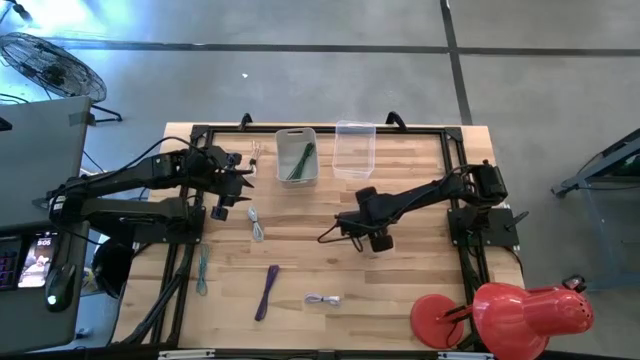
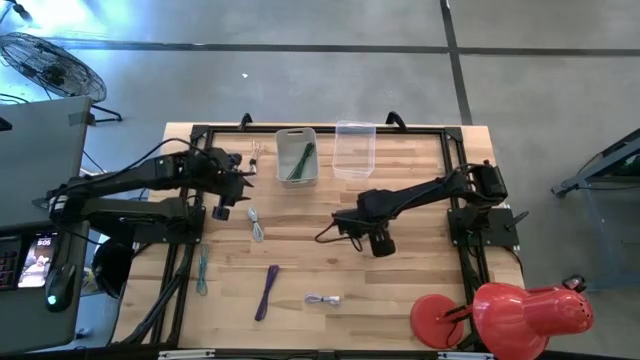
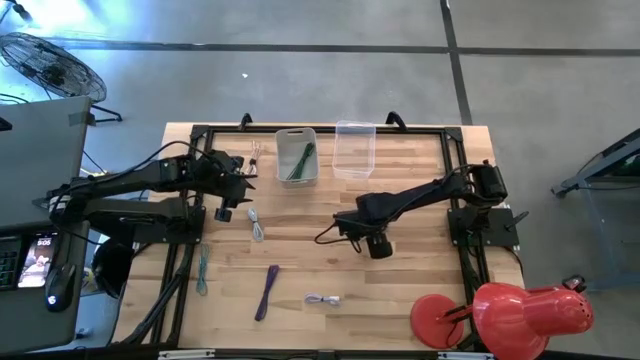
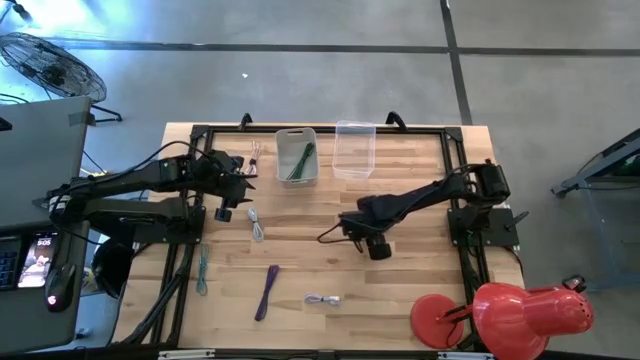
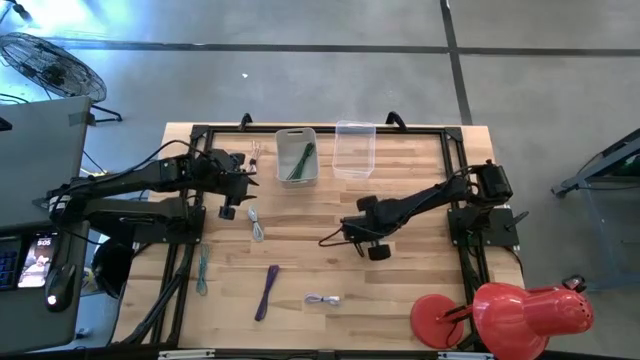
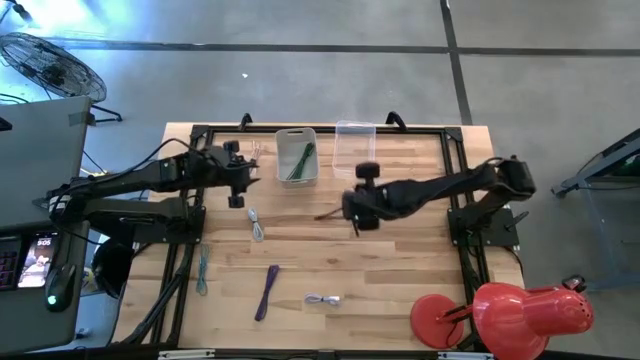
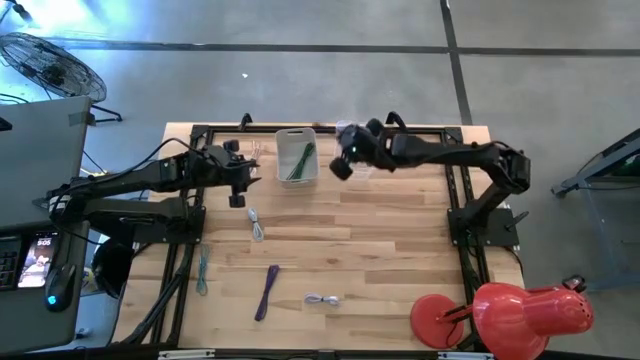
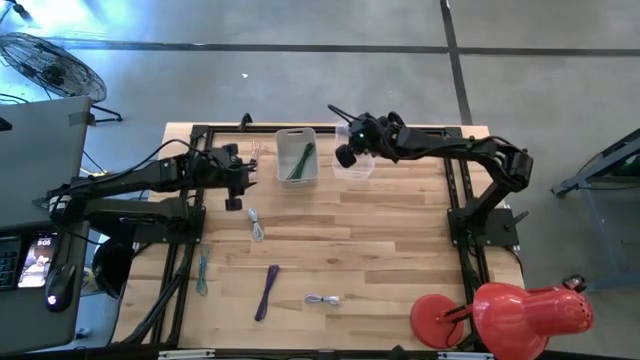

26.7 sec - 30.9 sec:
Task: Pick & Place USB Port
Put the white charger cable into the transparent bin

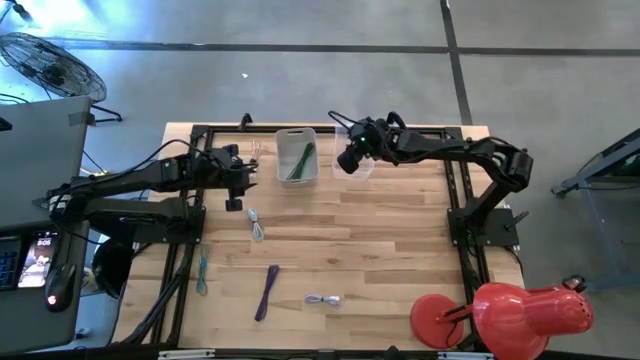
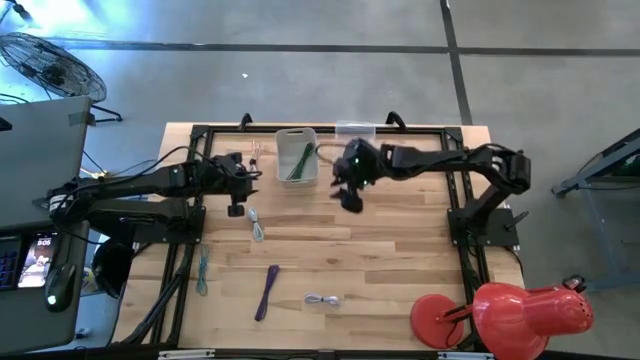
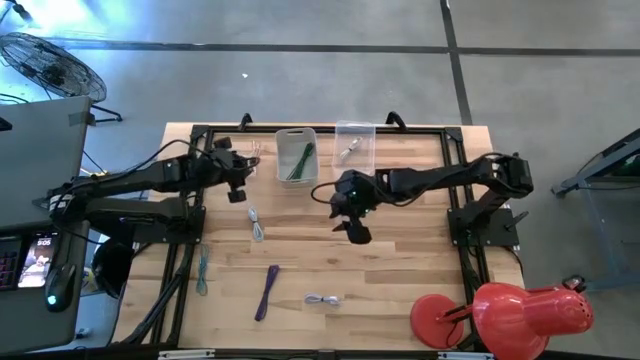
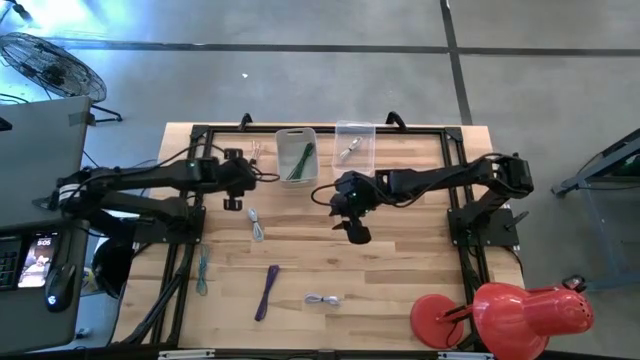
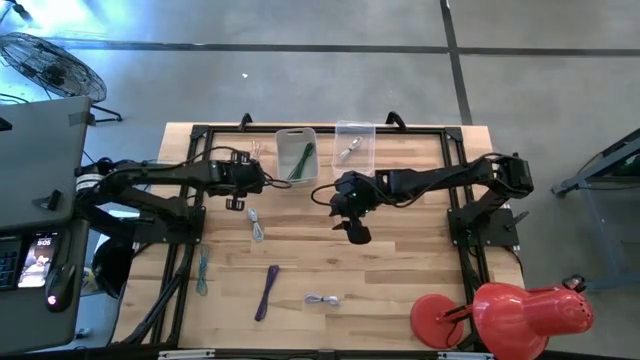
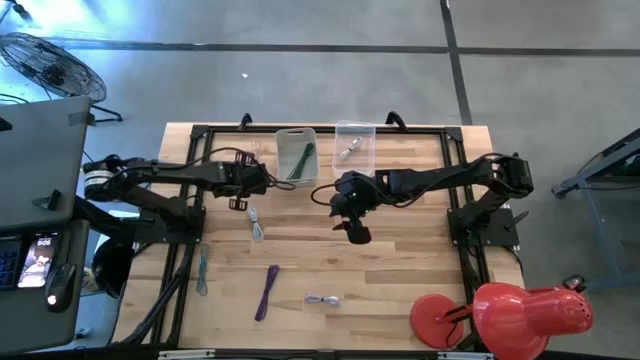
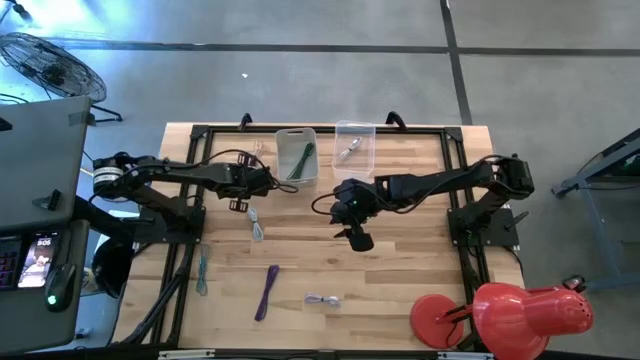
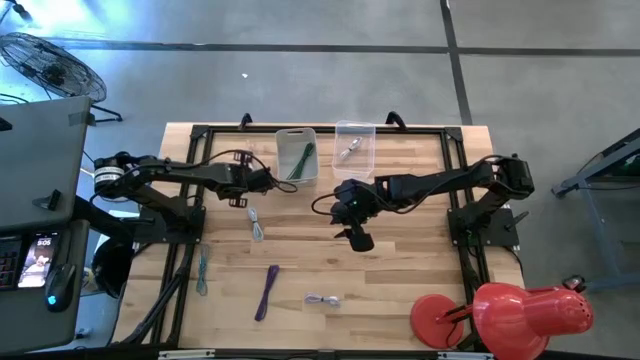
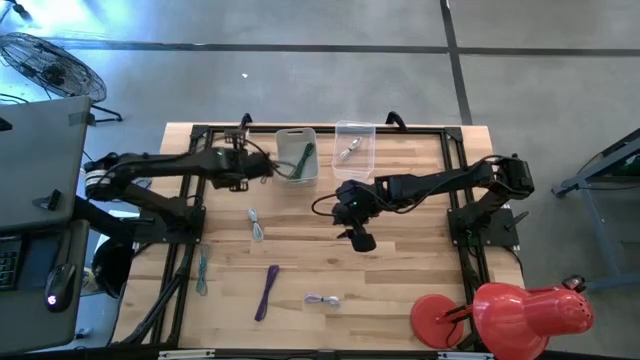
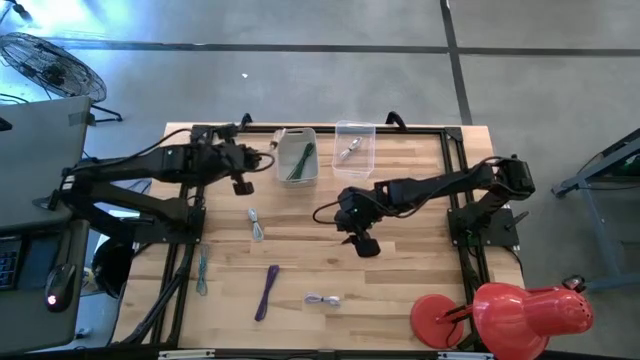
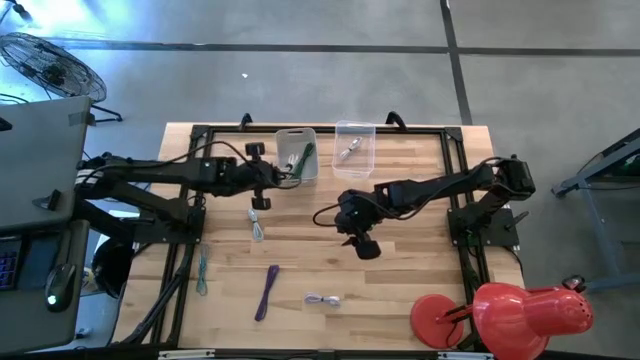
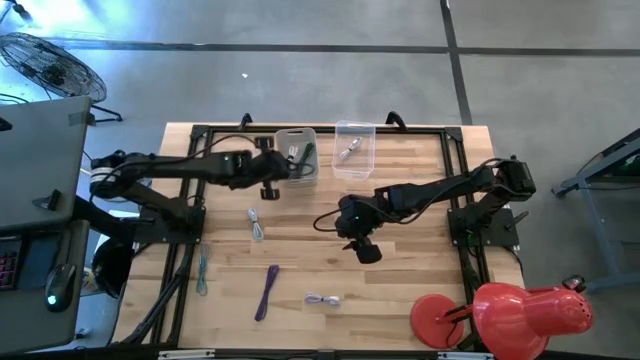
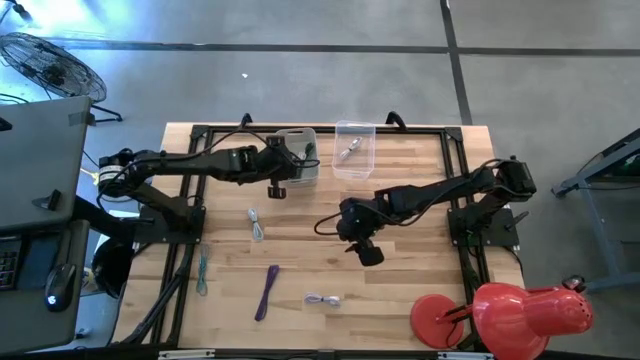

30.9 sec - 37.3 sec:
Put the light pink charger cable into the grey bin

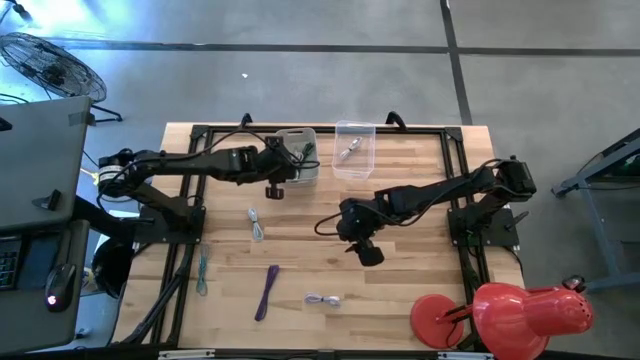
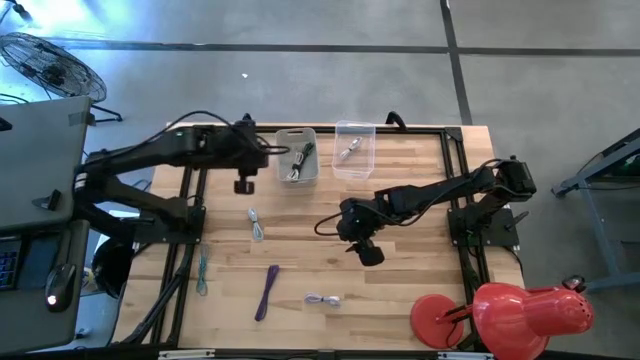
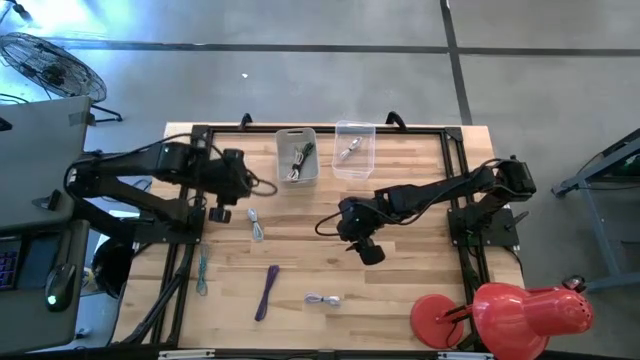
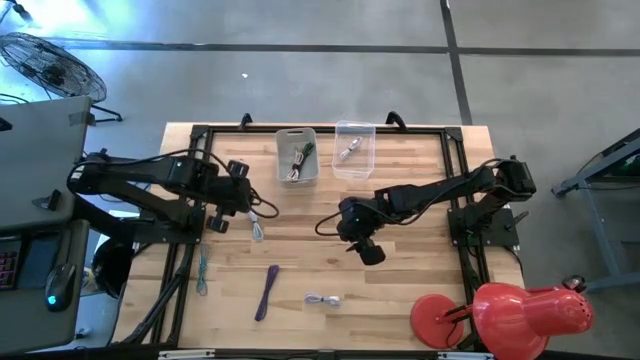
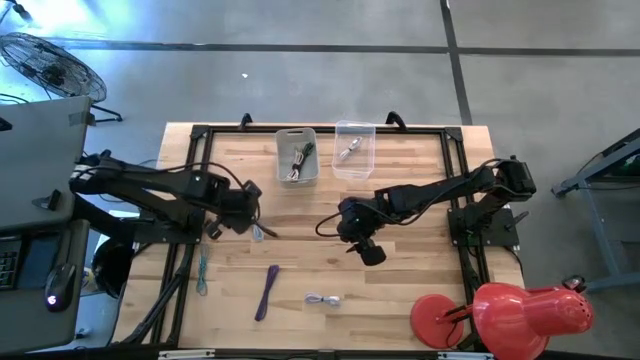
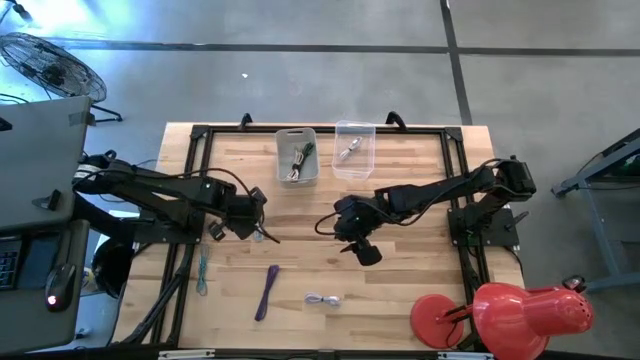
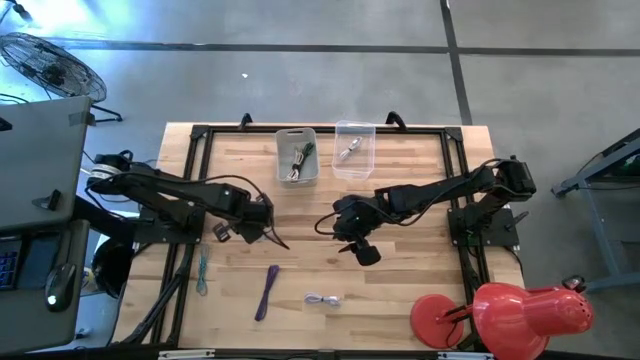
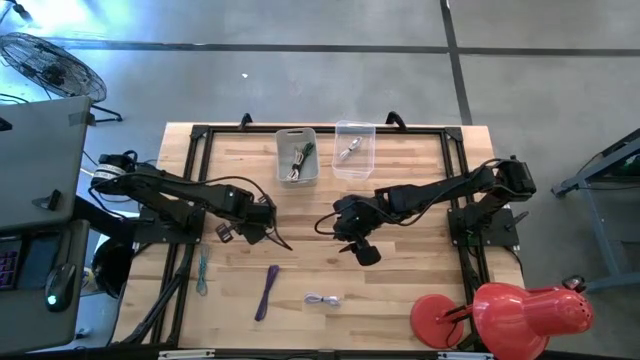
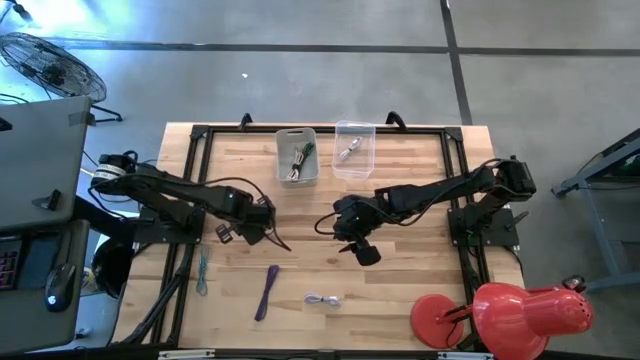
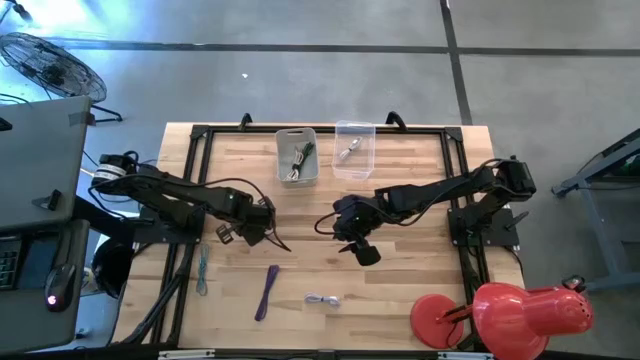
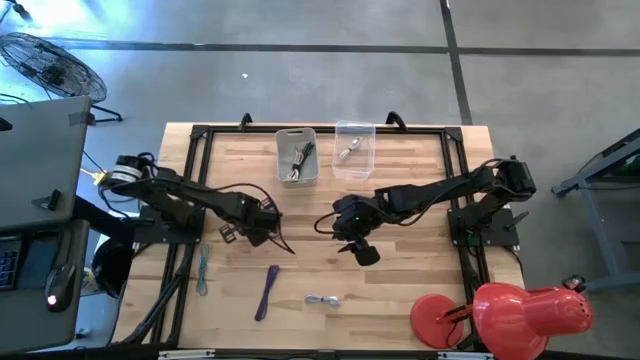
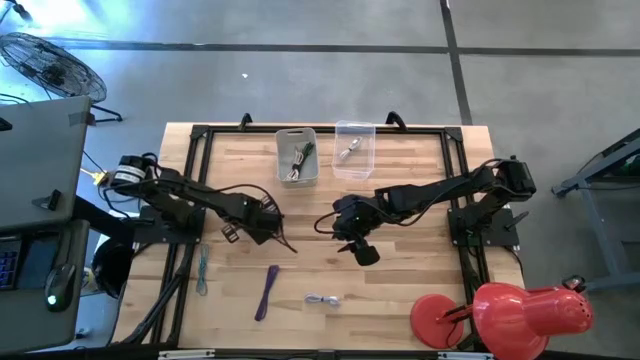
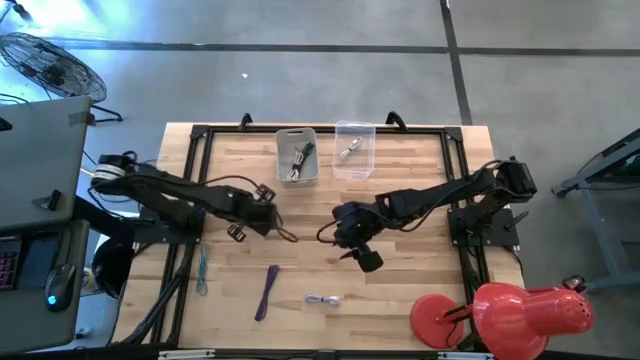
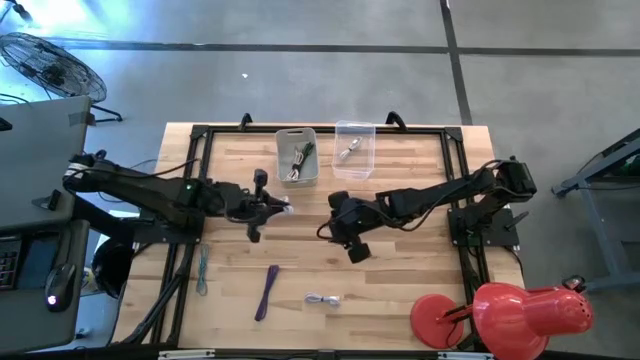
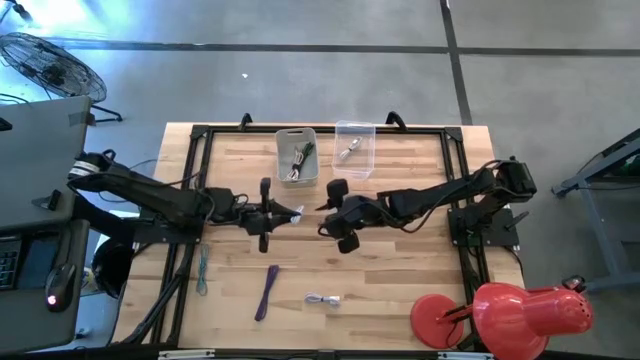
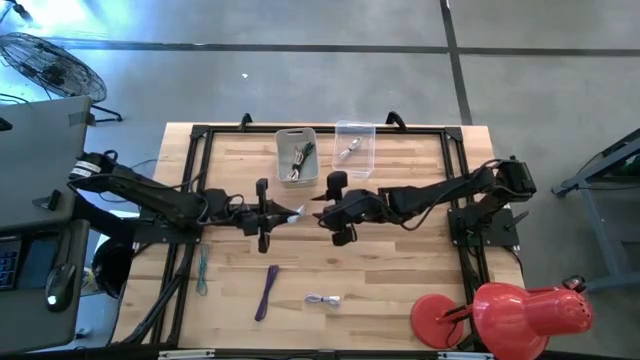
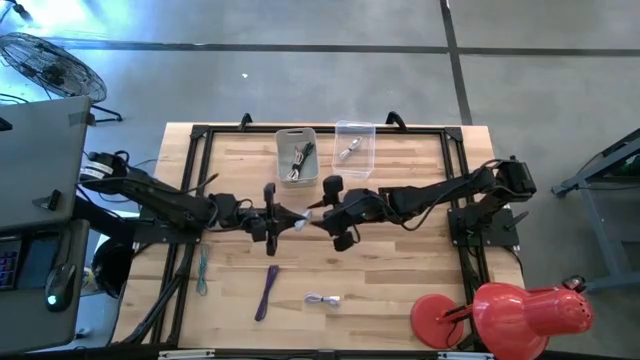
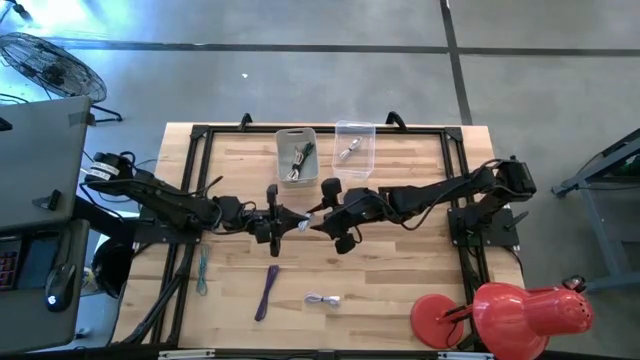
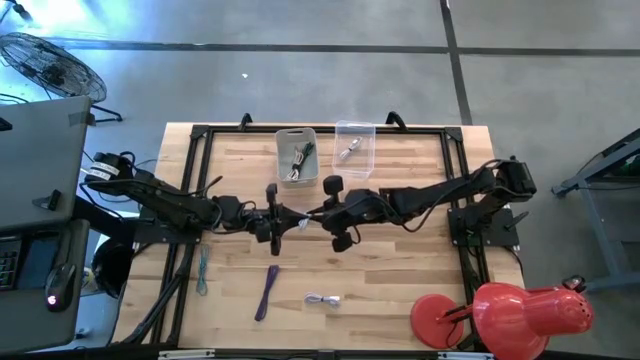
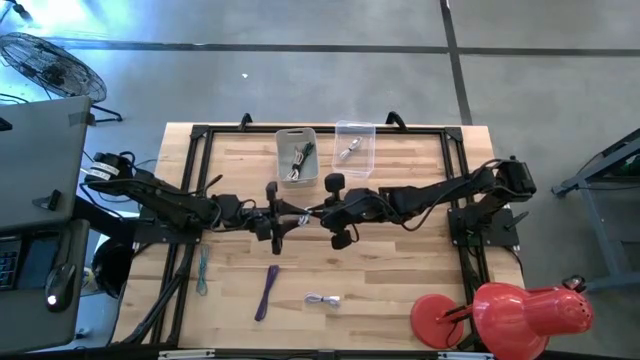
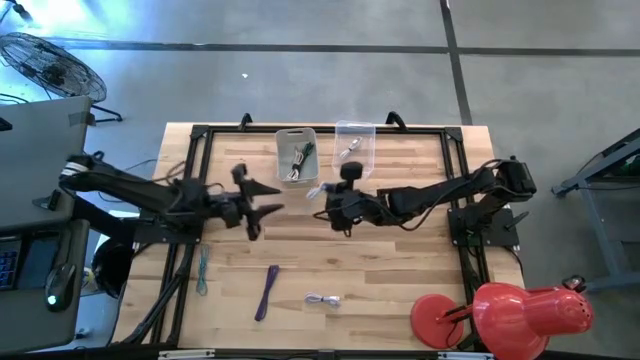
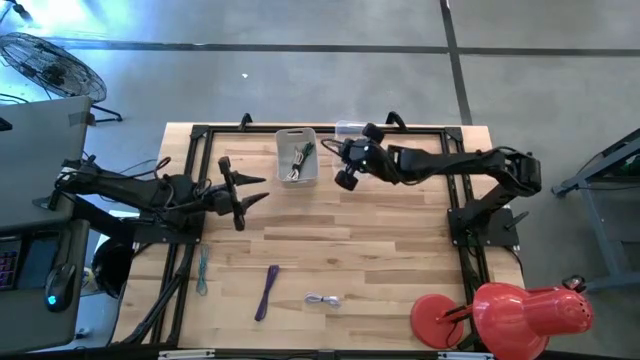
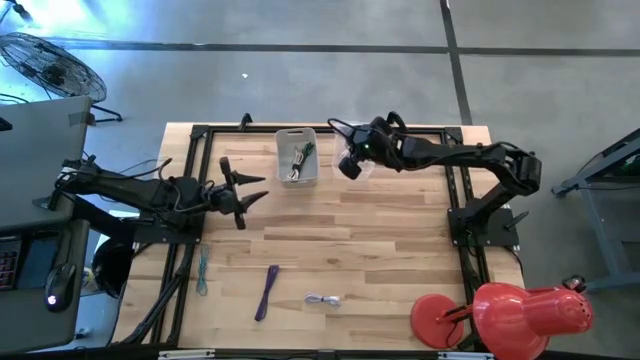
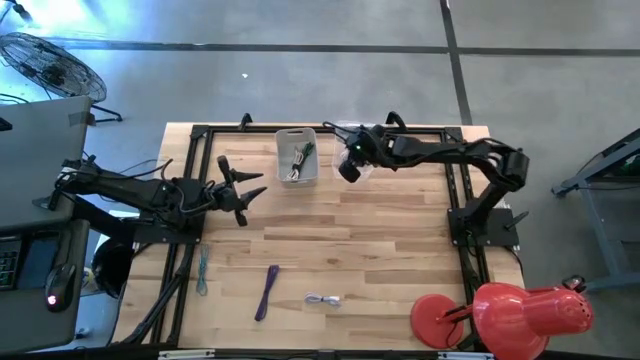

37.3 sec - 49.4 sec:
Put the blue charger cable into the transparent bin
